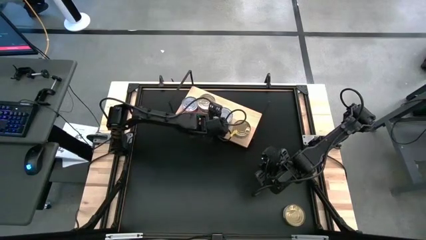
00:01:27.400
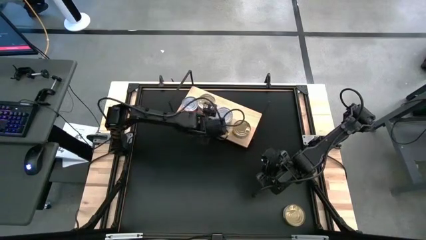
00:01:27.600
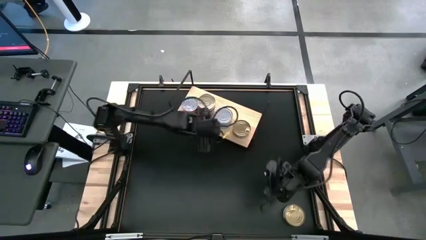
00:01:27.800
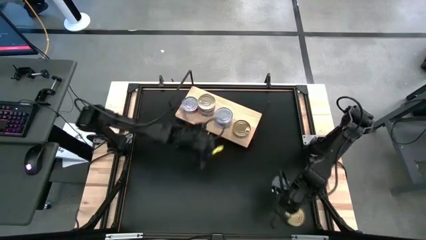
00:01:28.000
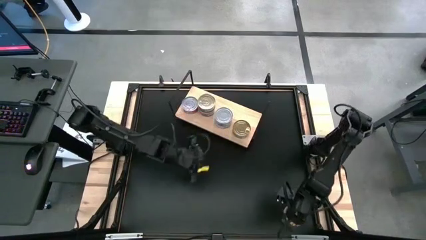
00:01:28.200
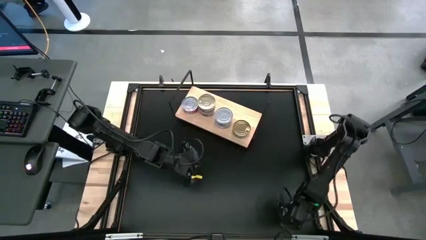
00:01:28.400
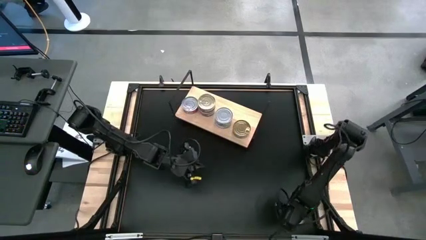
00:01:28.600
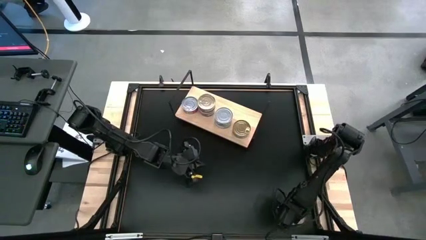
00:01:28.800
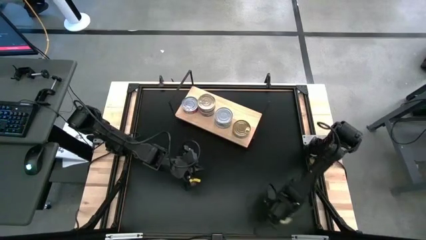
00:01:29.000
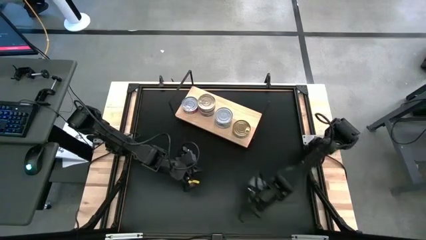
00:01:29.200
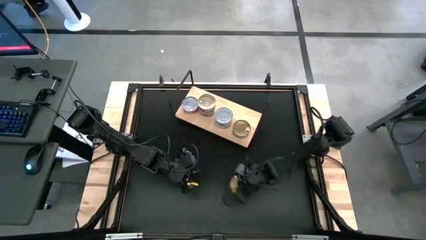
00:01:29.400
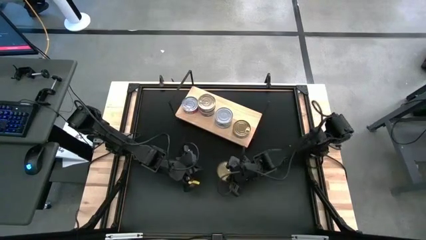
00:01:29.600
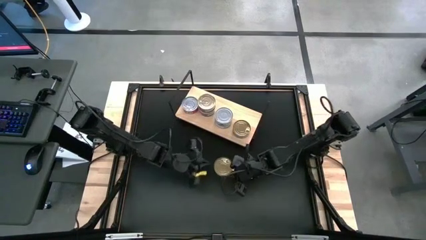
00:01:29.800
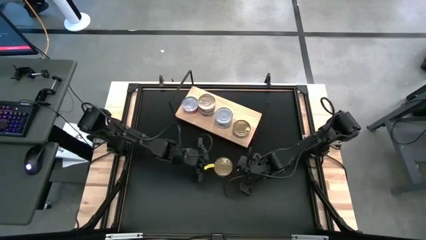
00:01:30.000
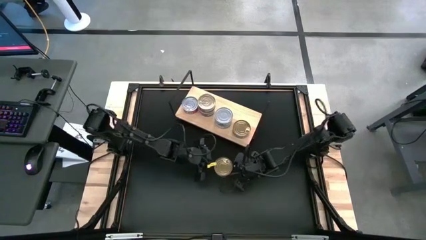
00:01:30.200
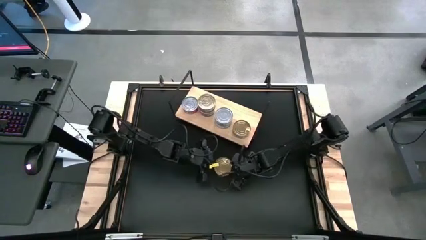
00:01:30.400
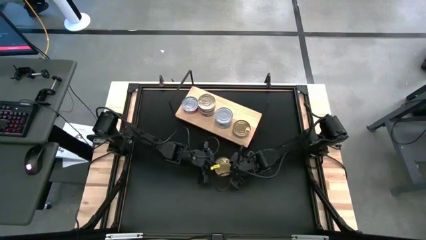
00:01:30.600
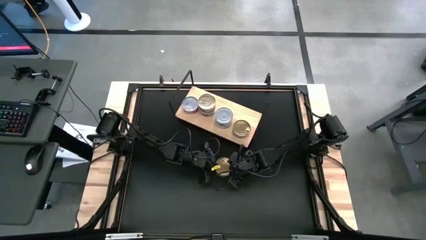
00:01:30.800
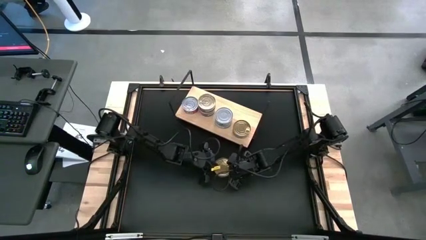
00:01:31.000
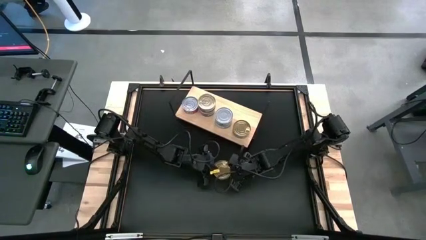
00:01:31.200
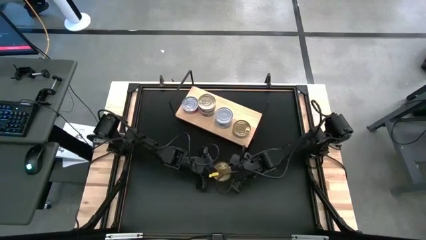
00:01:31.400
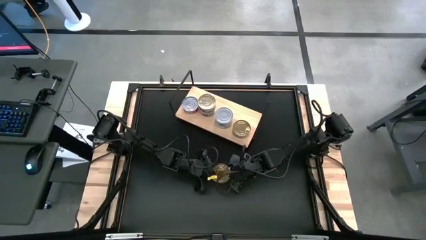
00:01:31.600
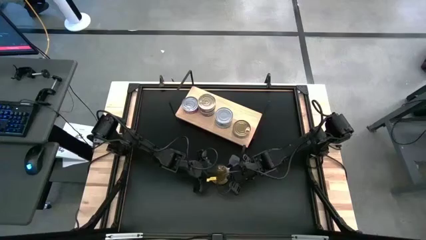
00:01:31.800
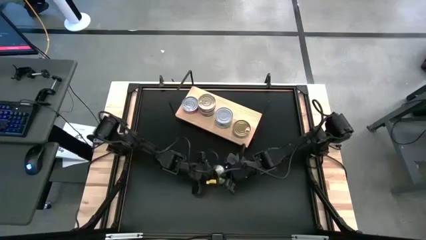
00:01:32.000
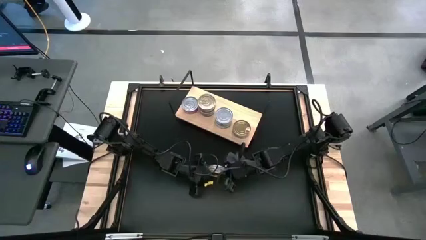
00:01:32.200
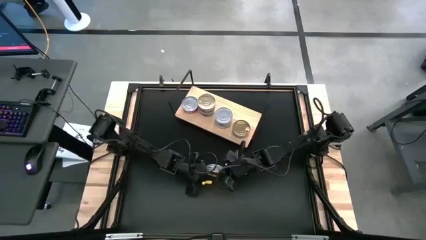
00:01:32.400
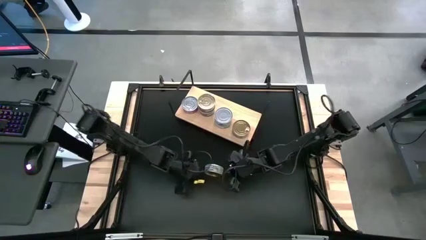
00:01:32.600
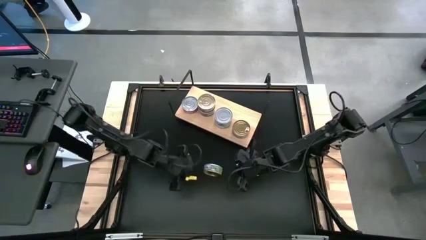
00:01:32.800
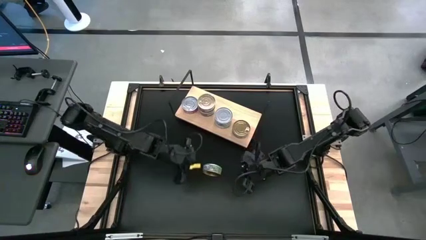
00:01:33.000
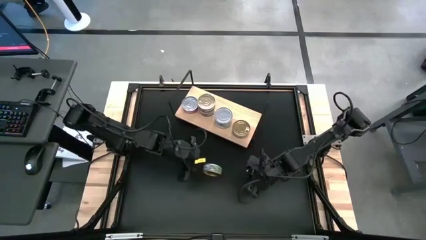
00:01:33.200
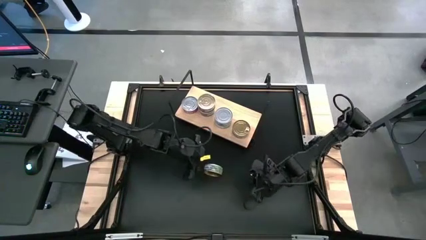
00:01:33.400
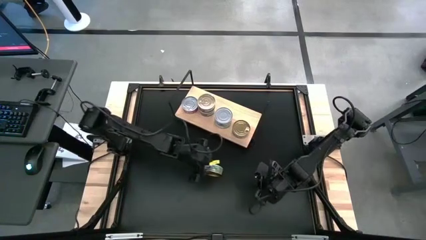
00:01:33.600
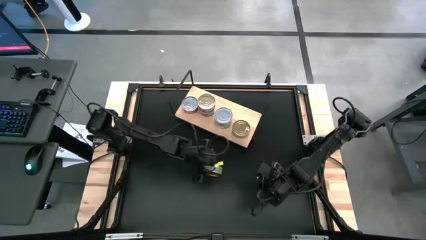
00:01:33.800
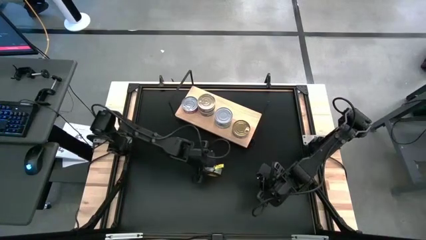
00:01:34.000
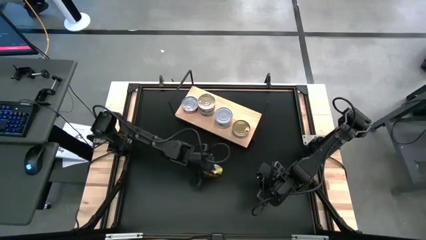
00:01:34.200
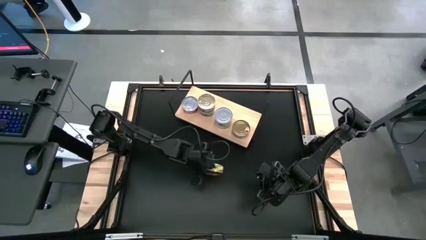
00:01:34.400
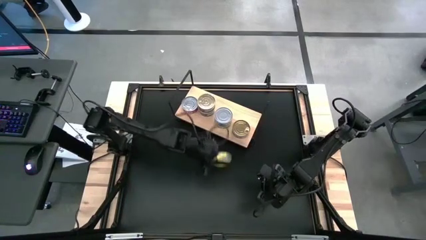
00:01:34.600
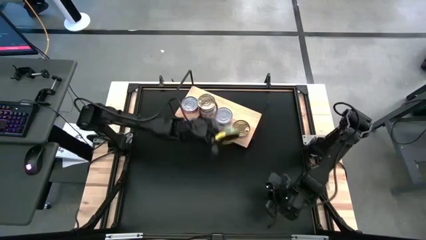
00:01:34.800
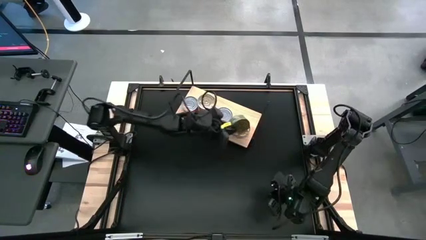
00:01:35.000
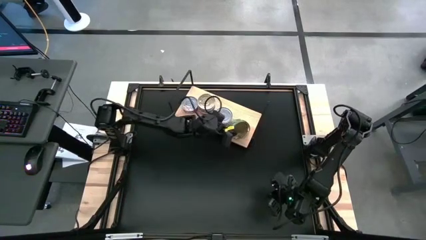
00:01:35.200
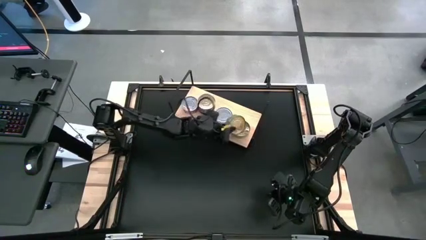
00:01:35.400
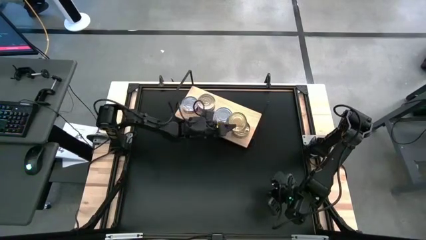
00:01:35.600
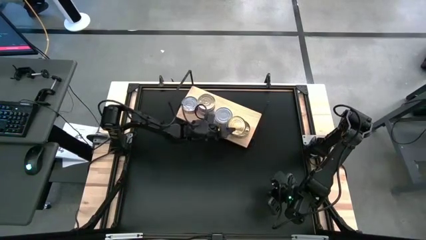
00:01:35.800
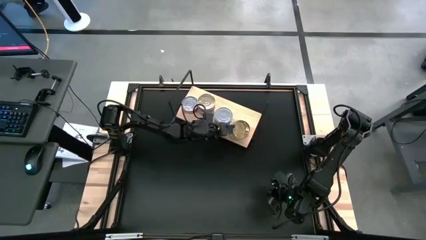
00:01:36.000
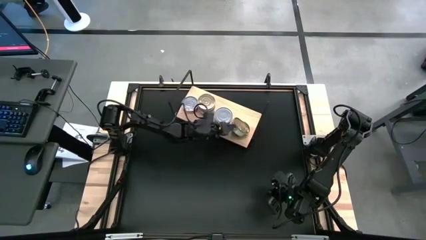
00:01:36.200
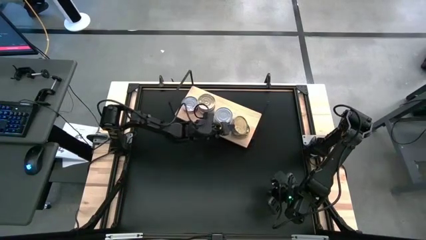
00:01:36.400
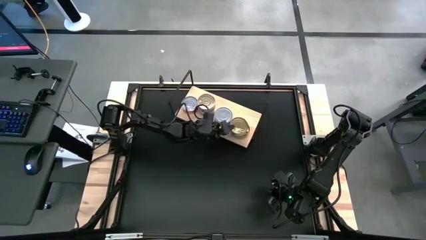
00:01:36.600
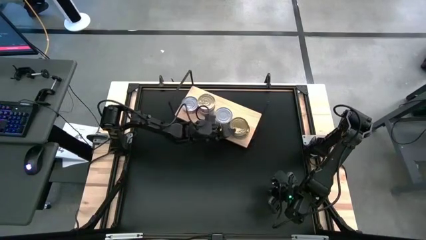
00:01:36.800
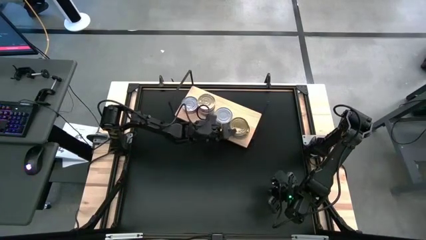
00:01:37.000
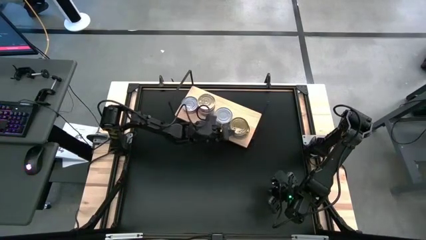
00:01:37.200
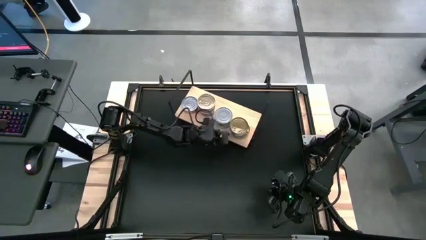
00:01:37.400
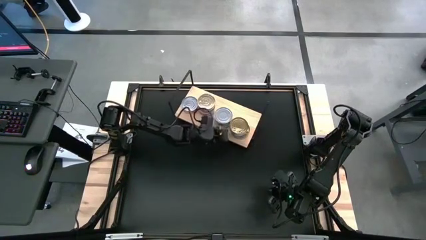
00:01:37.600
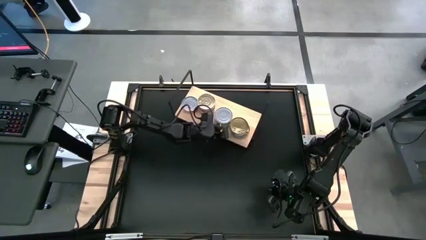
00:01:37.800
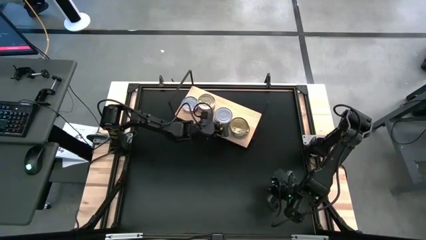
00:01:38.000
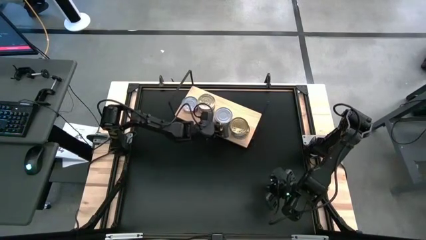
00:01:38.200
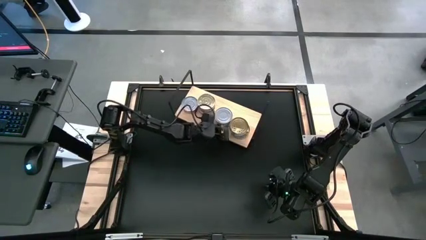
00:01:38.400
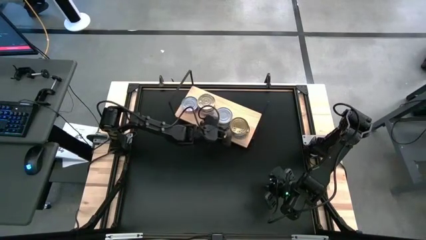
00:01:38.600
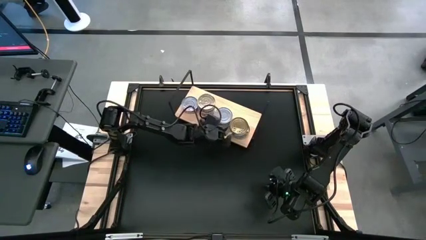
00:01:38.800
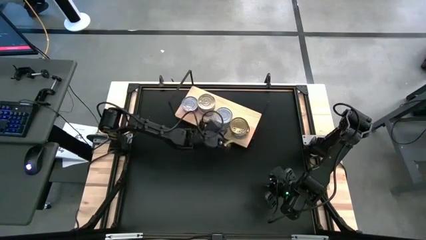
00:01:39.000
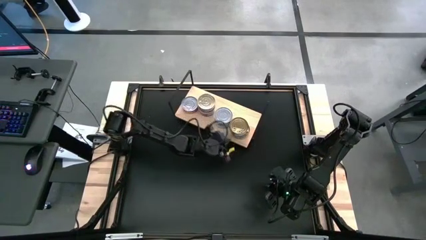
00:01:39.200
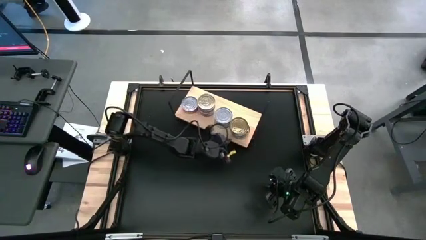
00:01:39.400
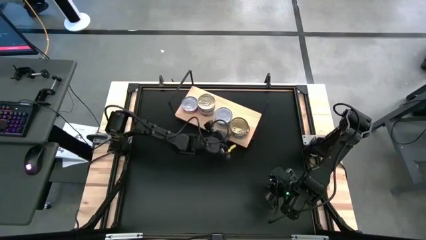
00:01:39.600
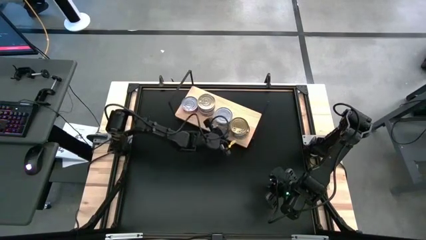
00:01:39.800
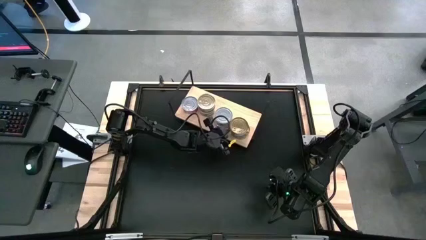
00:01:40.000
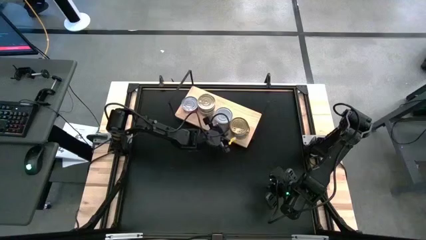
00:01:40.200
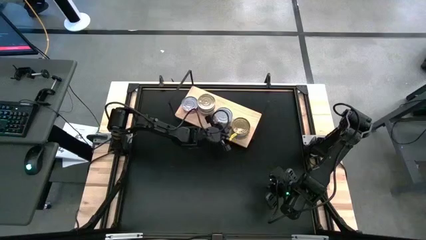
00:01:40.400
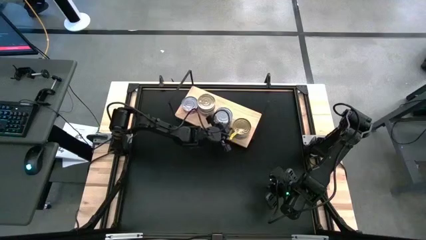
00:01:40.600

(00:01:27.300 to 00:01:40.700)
Task: Stack canned seafood by type on shelf
Stack the green tuna can on top of the green tuna can on the shelf
